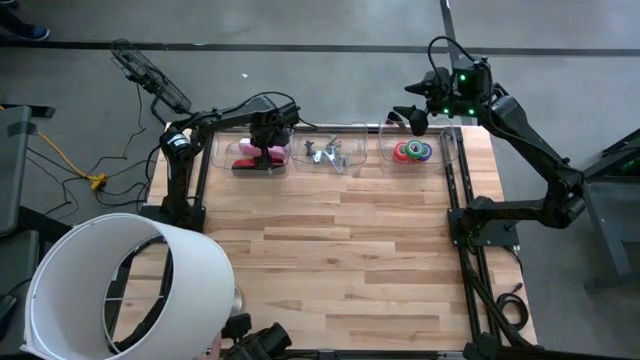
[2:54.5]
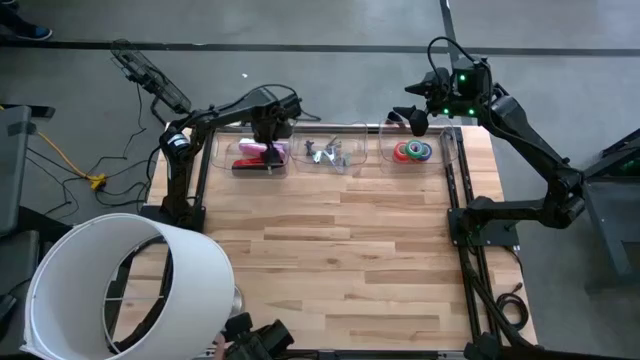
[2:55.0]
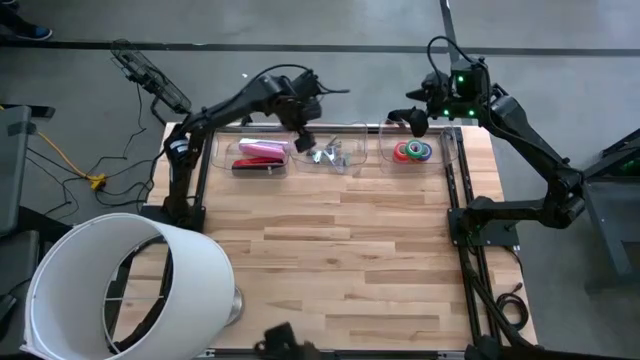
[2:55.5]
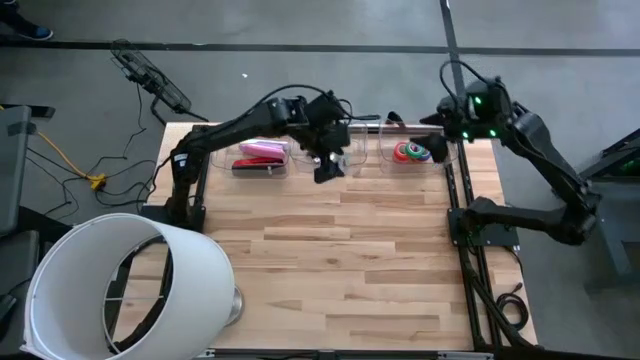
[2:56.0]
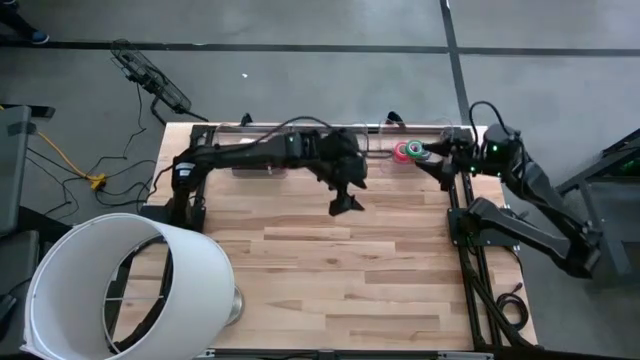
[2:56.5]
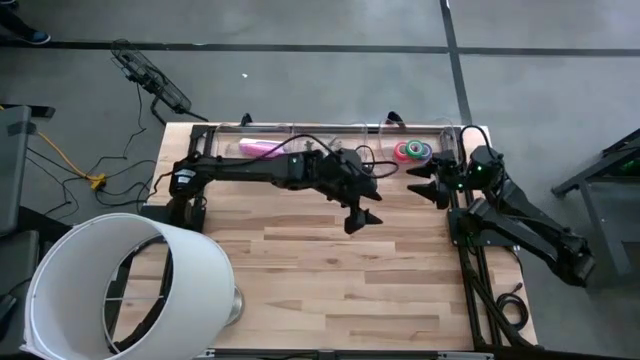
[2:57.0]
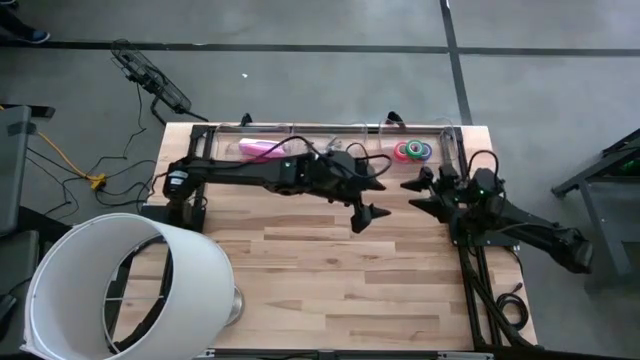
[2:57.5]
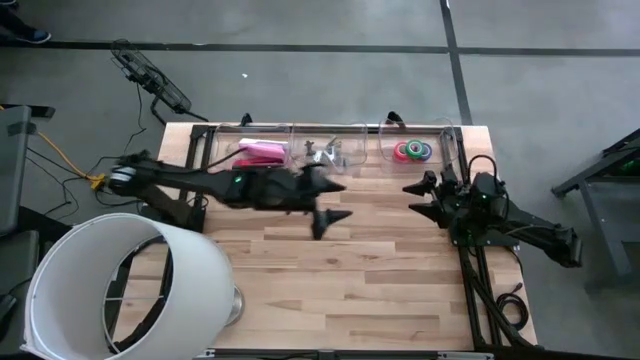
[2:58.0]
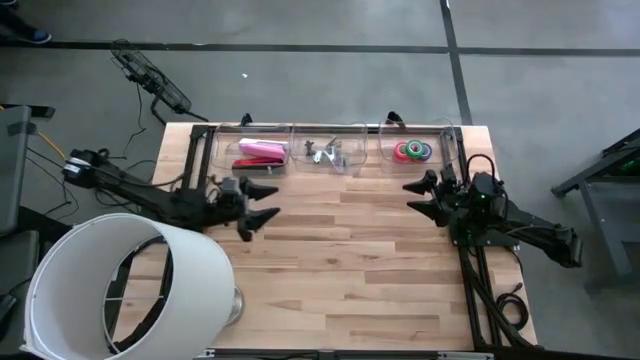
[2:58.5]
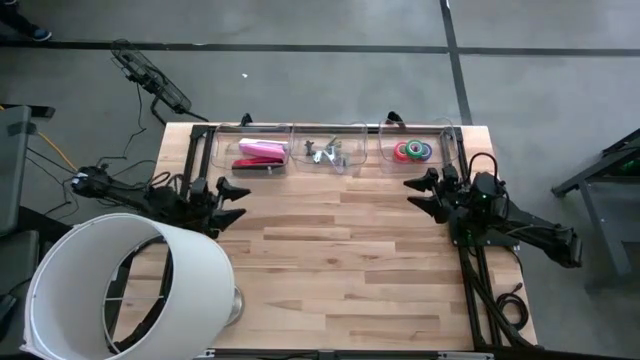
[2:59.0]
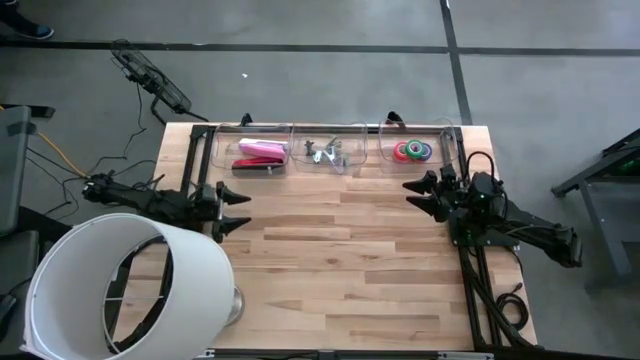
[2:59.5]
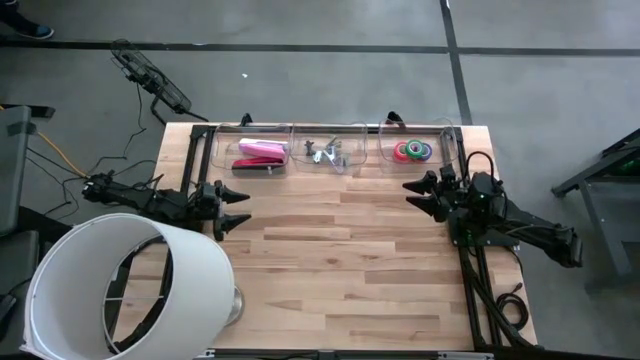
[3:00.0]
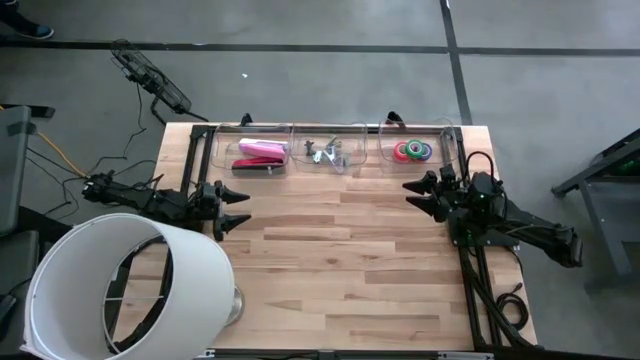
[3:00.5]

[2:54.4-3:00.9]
Task: Pick and place Stapler, Stapler remover, tape
Return to Home Position

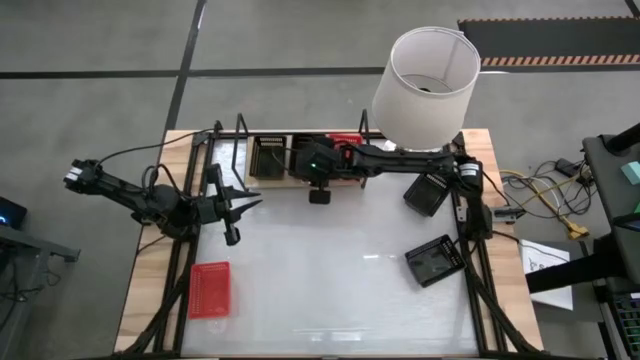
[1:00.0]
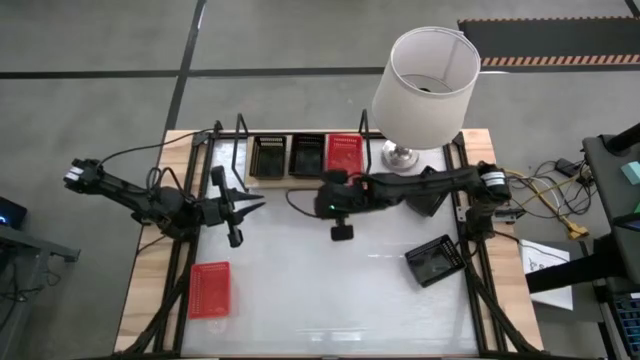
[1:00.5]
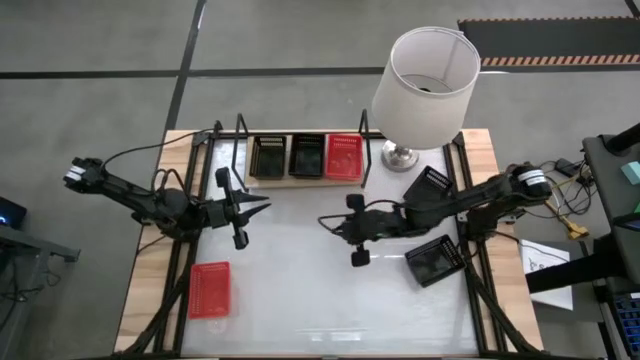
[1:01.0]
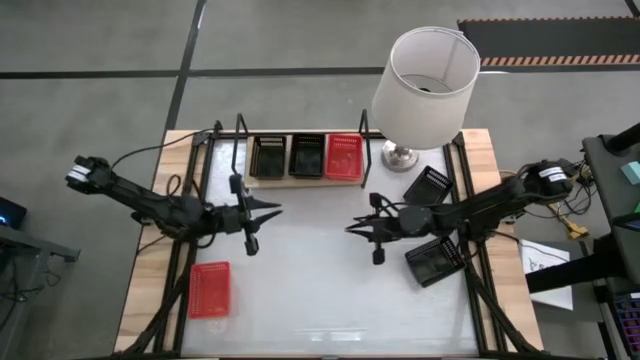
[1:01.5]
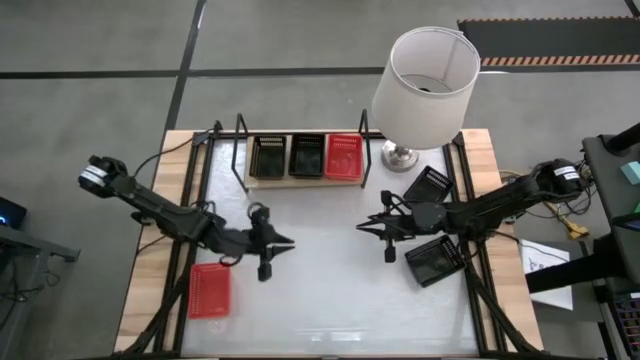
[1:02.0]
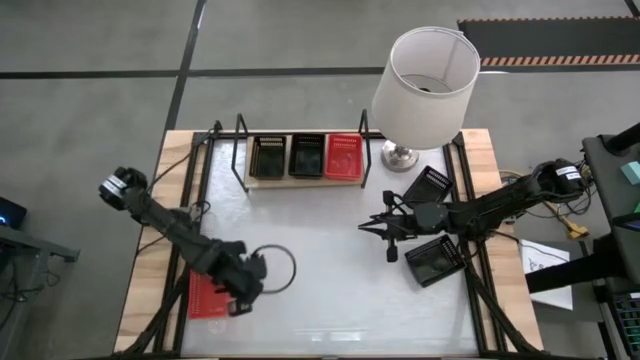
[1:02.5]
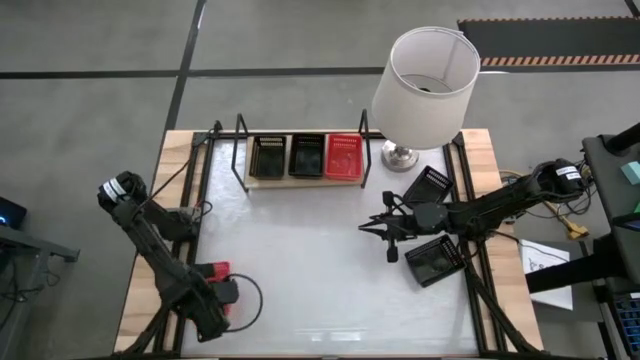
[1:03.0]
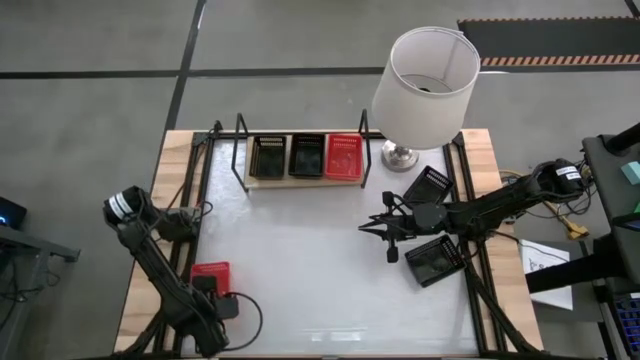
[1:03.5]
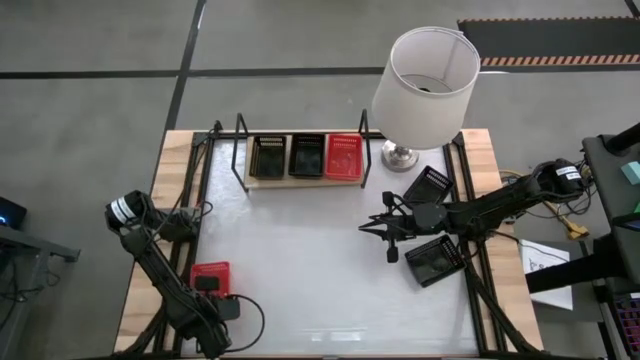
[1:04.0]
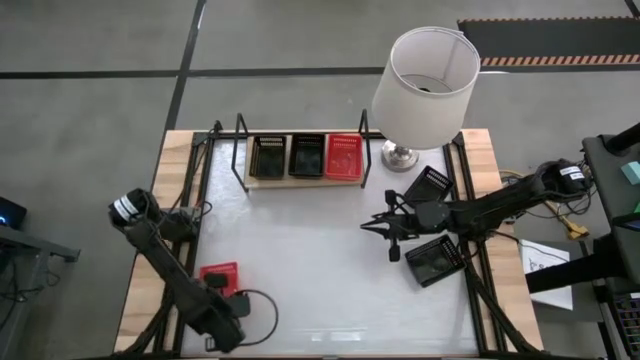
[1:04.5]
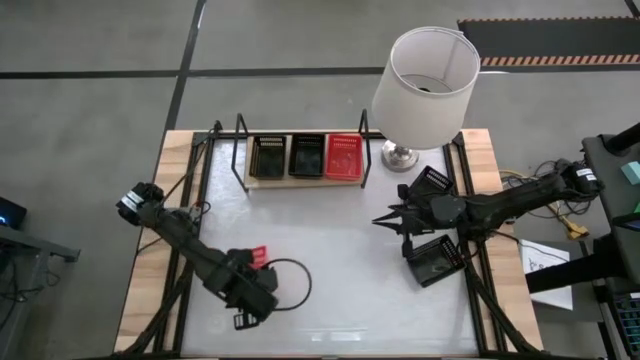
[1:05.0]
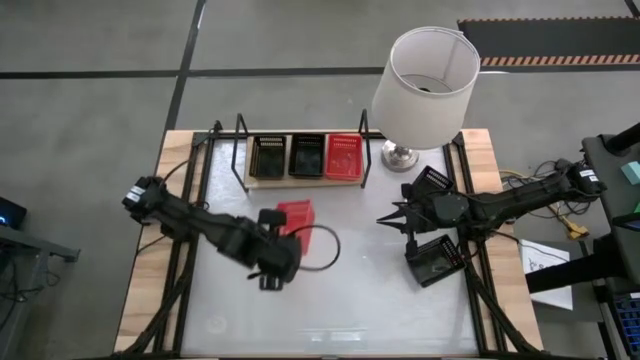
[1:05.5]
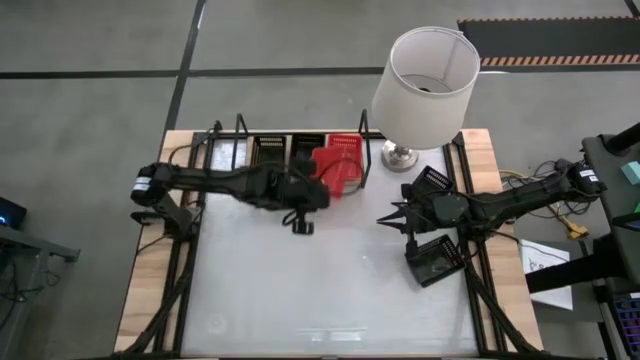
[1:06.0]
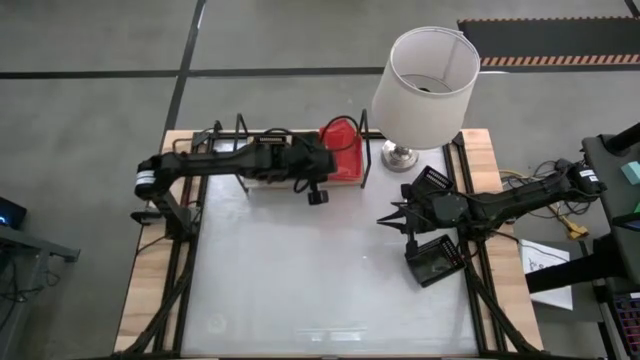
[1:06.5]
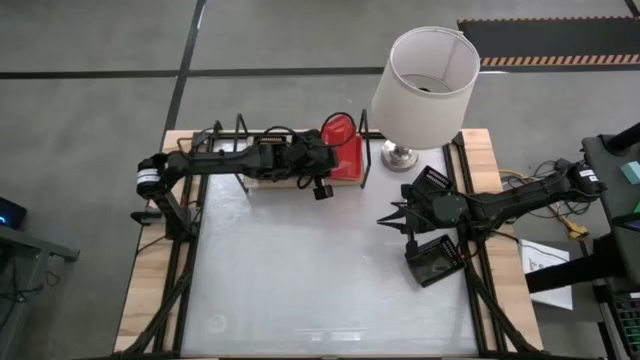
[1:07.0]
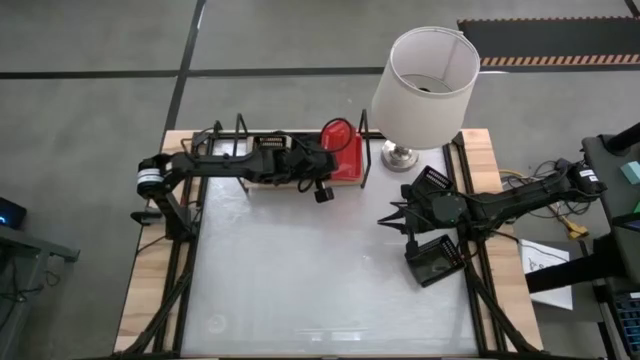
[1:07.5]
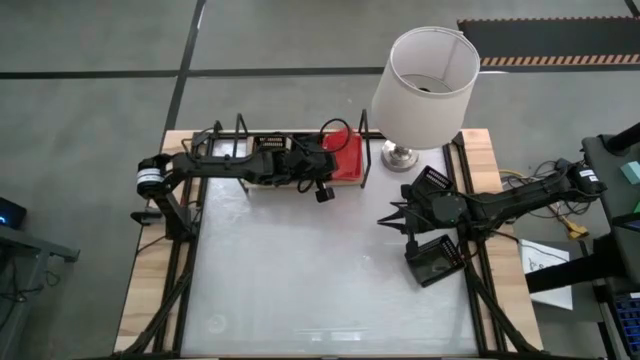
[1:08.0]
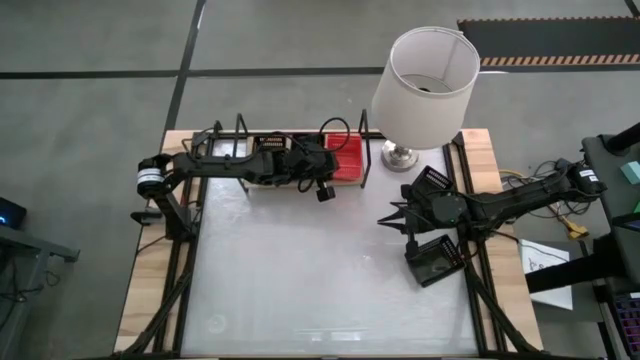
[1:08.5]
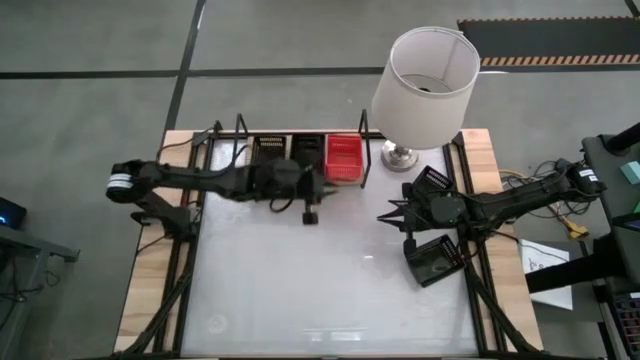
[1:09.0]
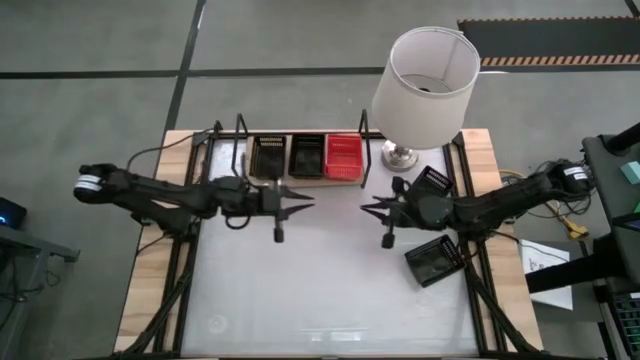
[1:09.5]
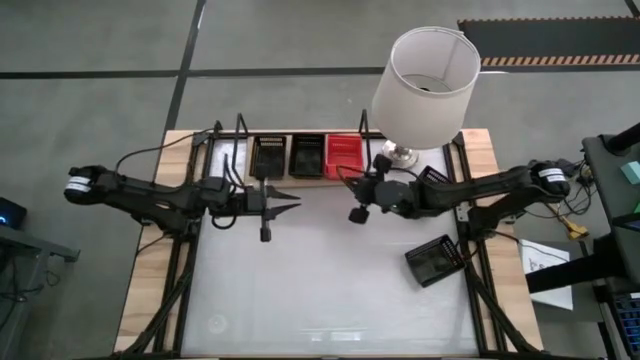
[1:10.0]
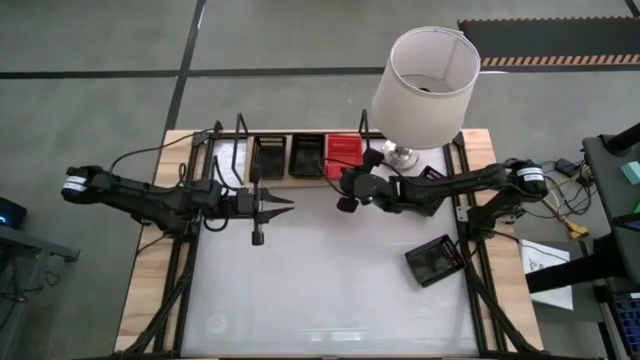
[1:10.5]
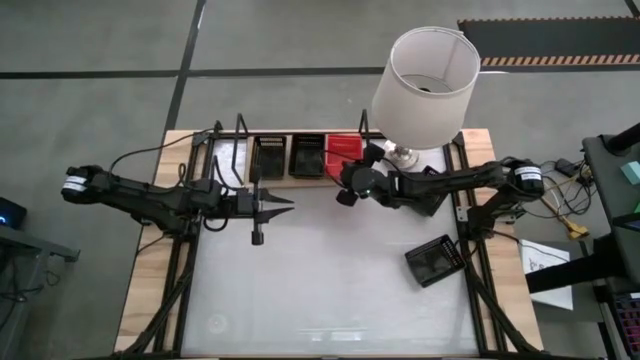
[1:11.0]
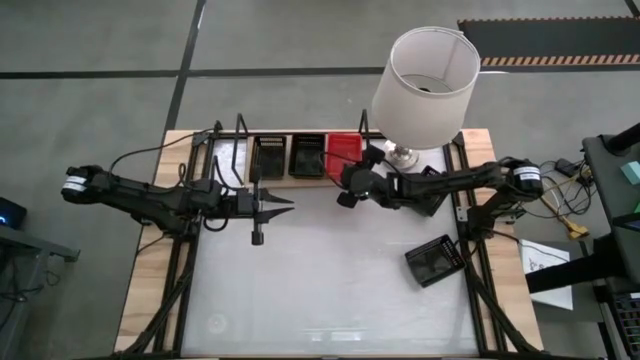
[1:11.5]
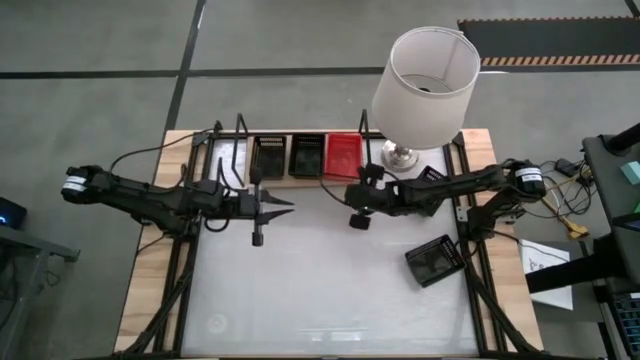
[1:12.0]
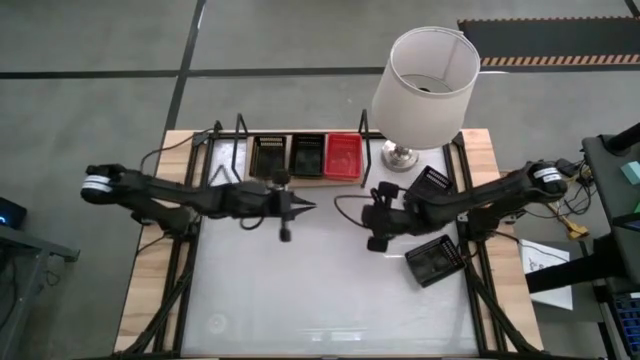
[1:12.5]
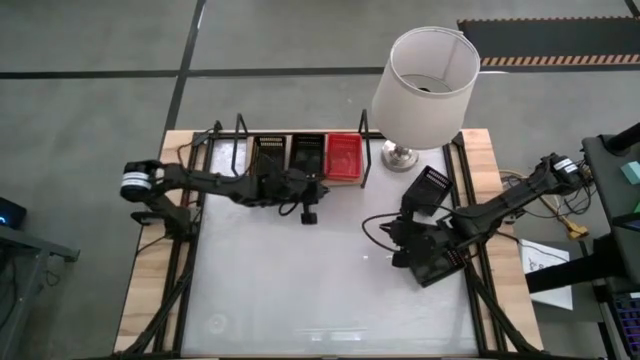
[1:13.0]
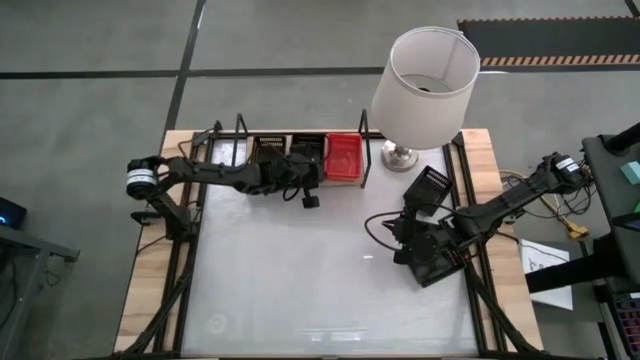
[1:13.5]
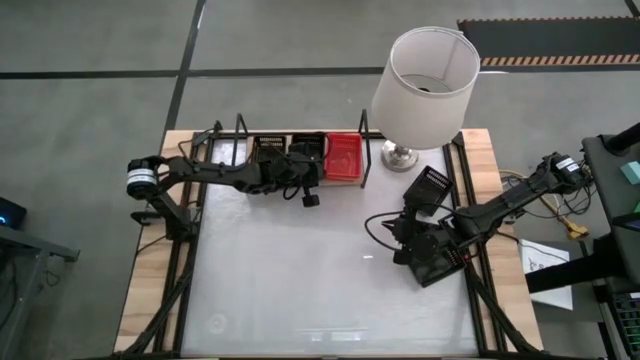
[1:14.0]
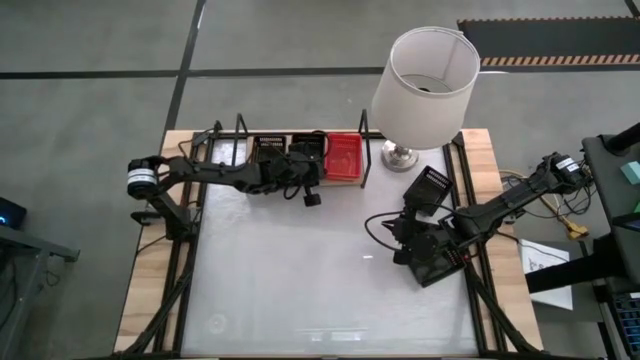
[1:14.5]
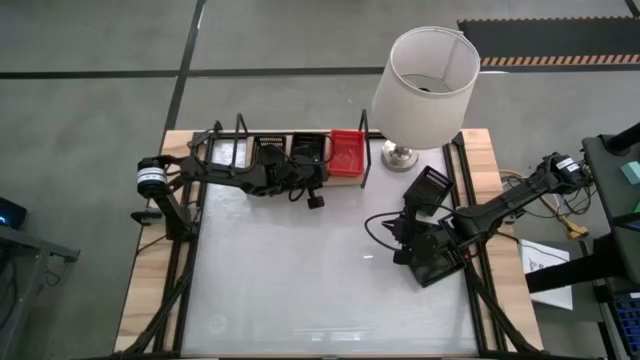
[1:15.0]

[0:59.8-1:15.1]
Task: Stack baskets on shelf by color
Stack the red bin on the red bin on the shelf
